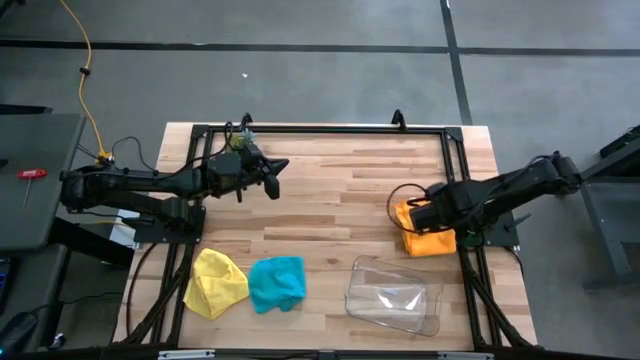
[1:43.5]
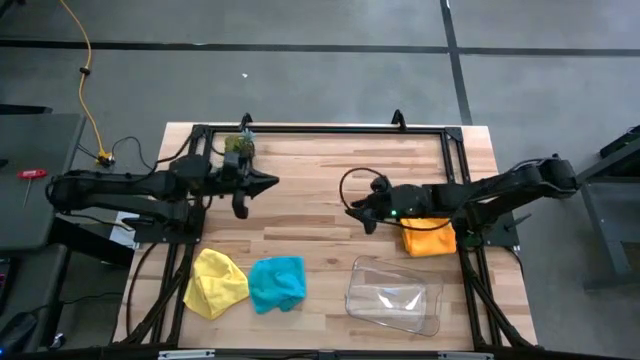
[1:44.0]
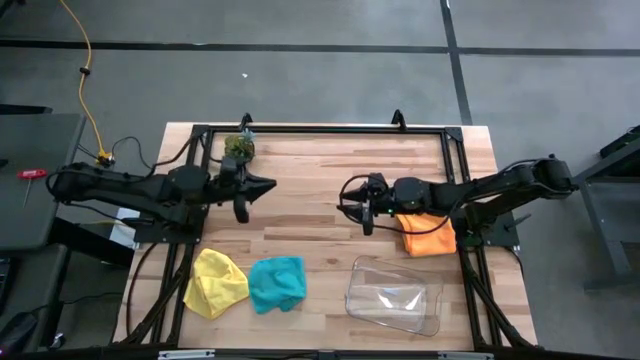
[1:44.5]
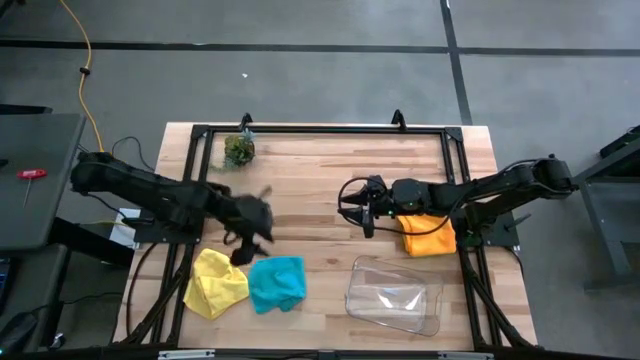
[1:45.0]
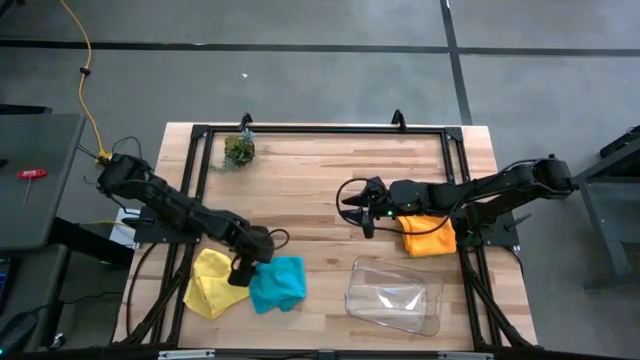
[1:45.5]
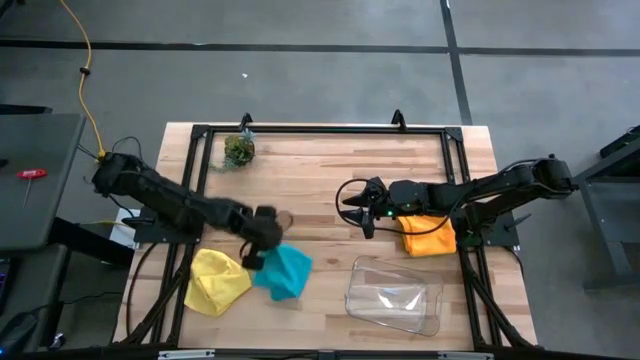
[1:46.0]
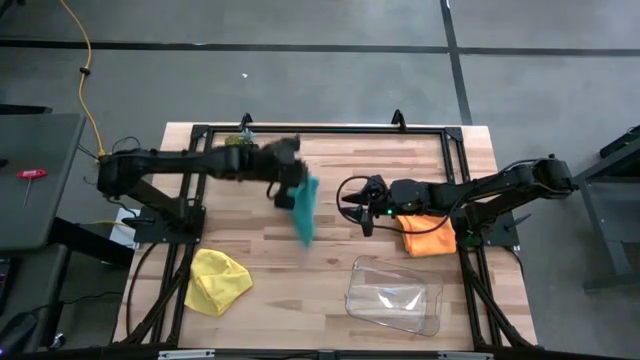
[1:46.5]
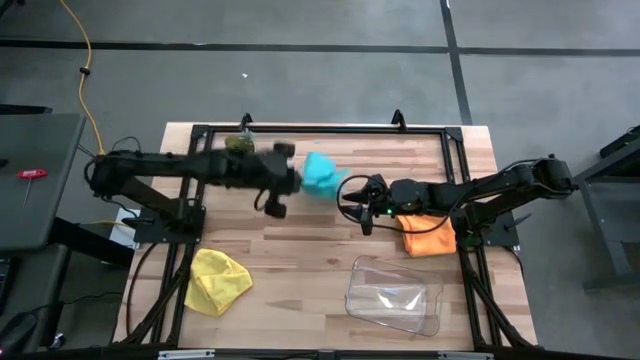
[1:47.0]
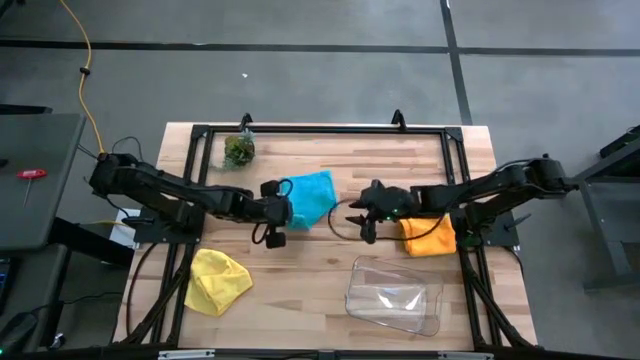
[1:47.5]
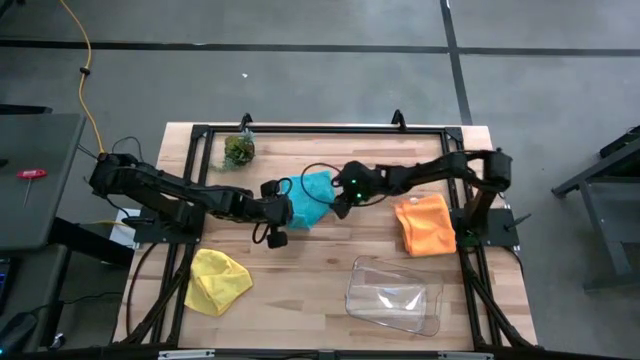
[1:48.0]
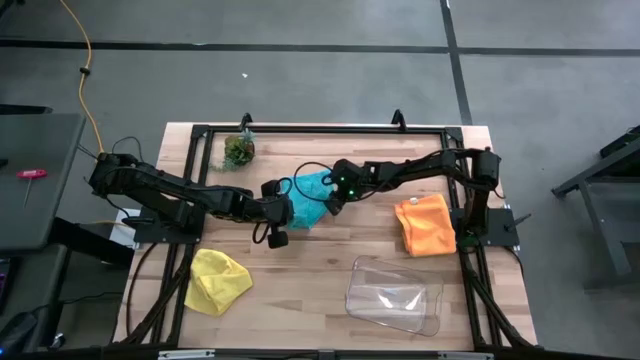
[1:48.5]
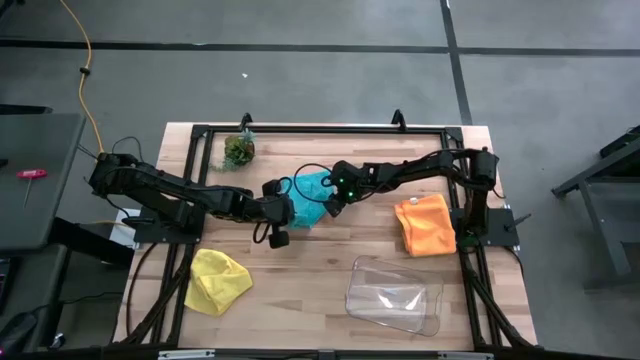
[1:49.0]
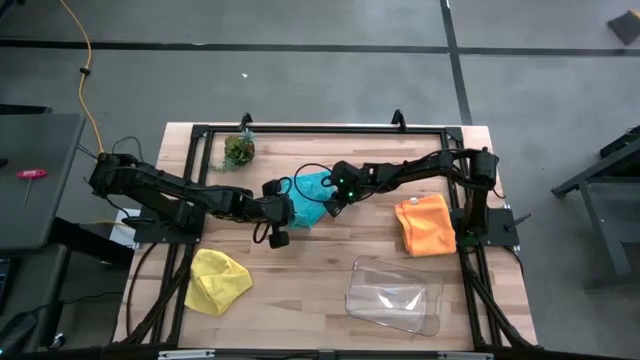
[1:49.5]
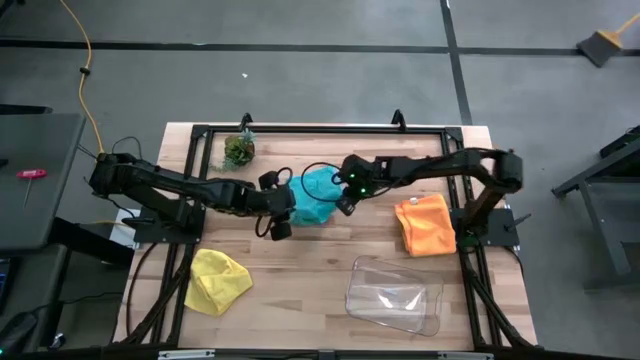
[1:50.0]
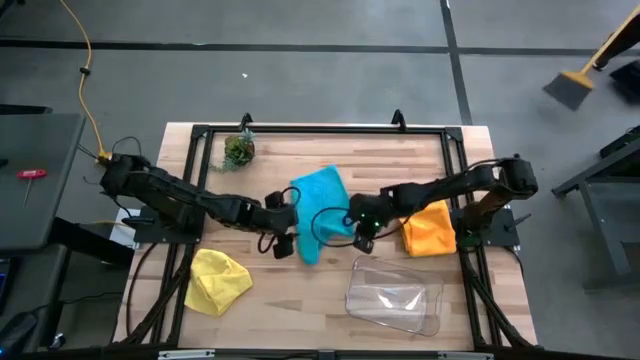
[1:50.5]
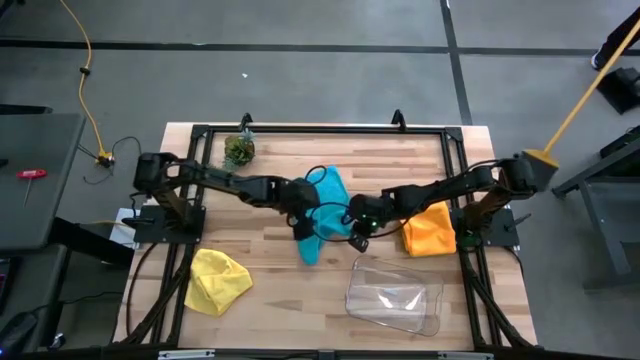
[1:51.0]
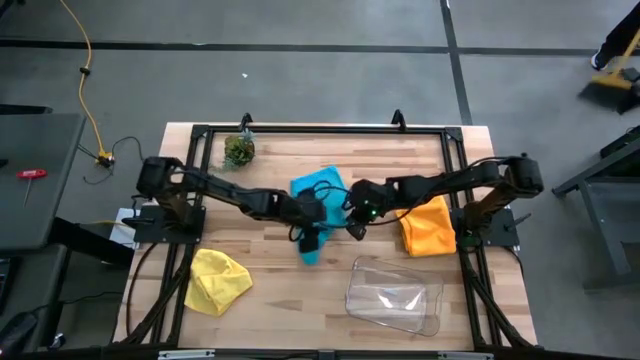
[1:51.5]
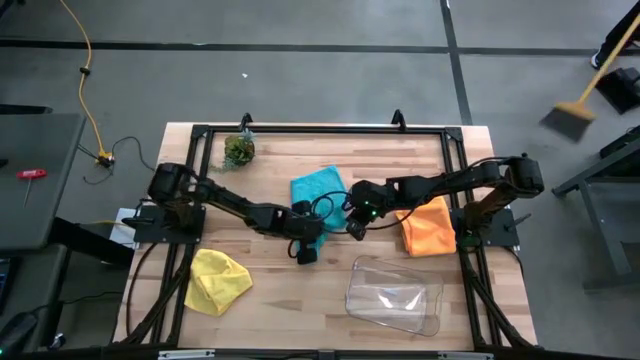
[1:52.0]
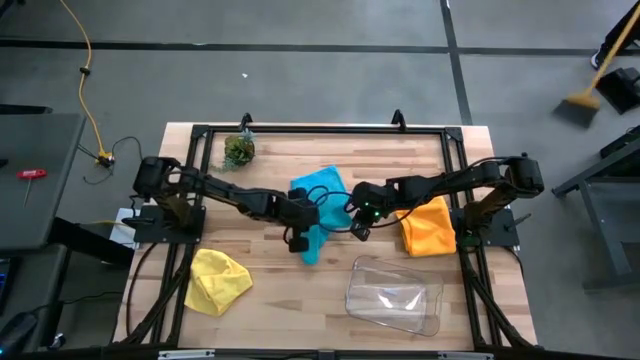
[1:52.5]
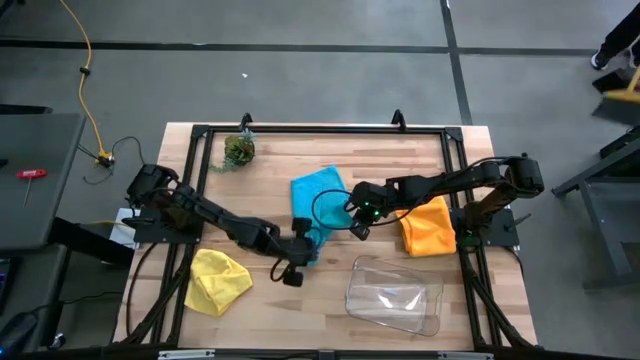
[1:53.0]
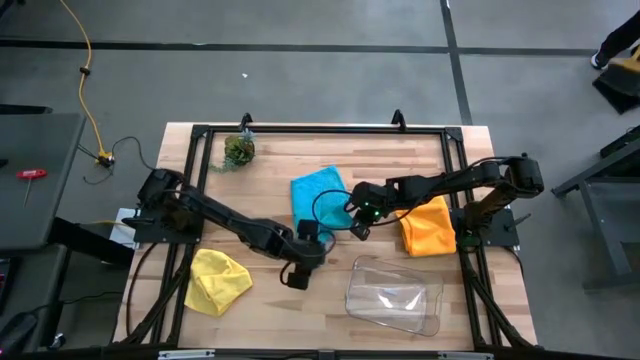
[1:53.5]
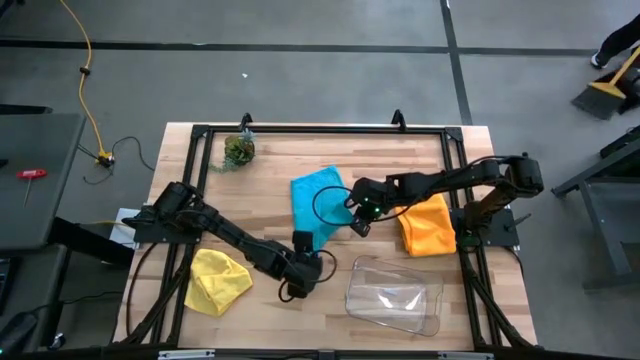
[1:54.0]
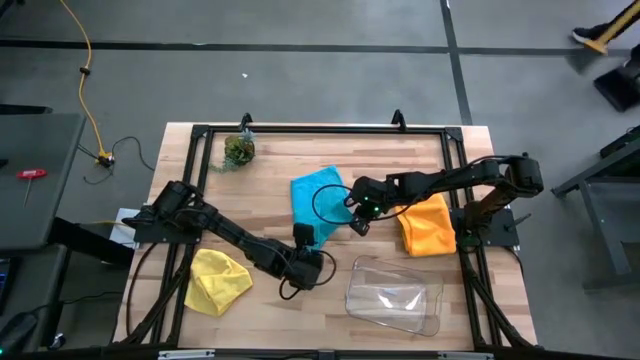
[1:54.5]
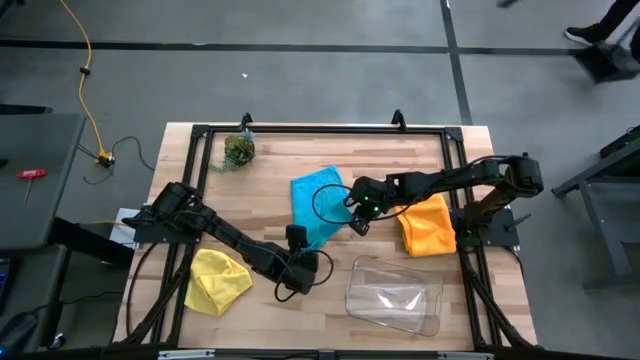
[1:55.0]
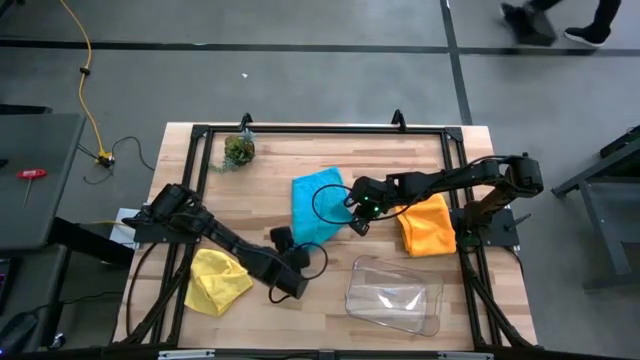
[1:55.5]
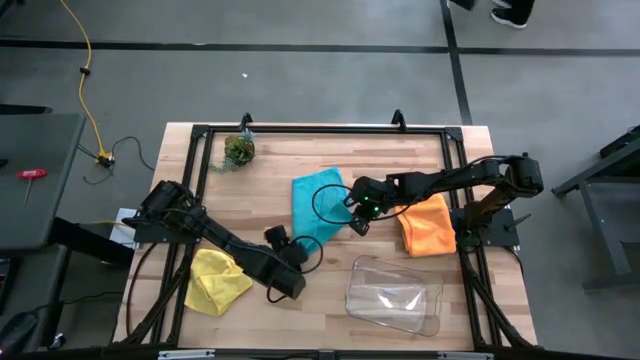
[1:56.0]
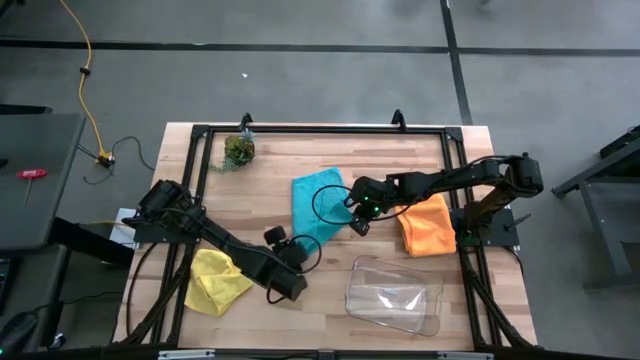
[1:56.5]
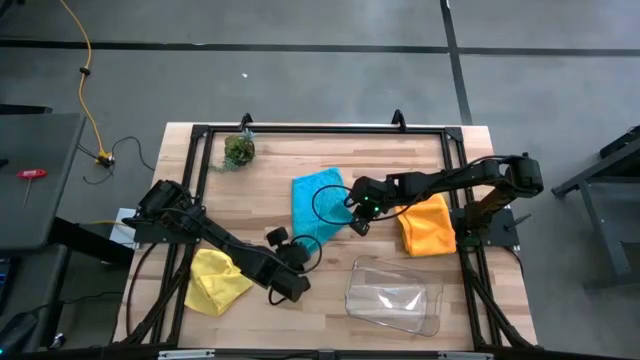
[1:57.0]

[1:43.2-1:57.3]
Task: Fold microfiber towels
Fold the blue cloth

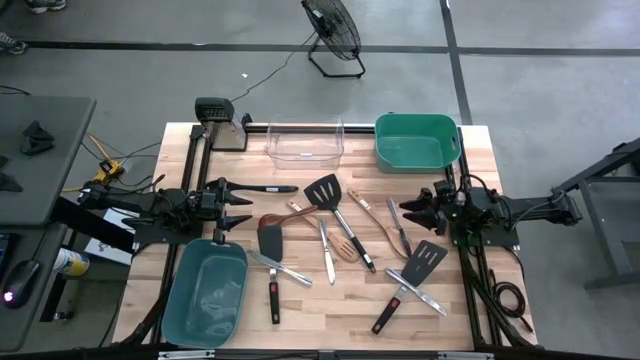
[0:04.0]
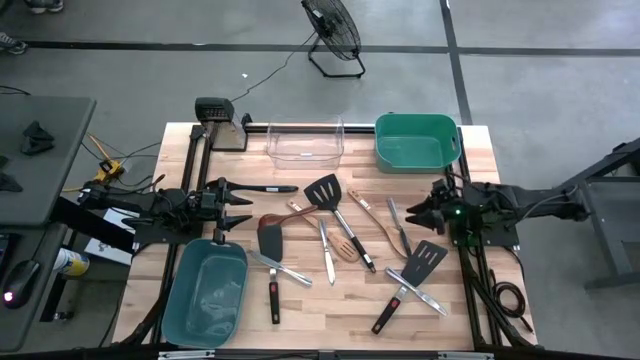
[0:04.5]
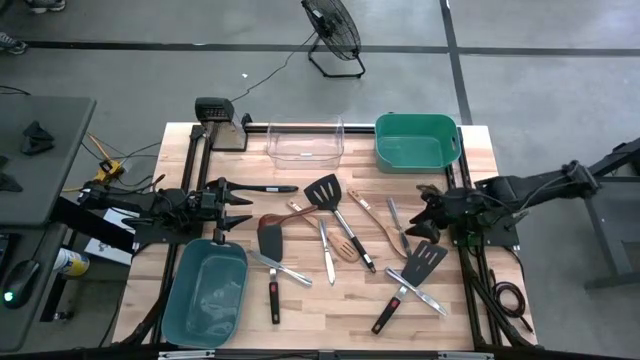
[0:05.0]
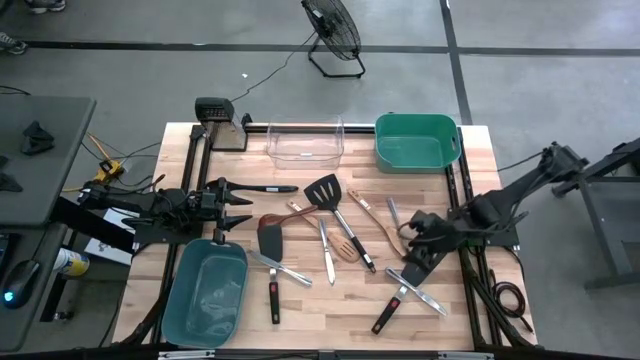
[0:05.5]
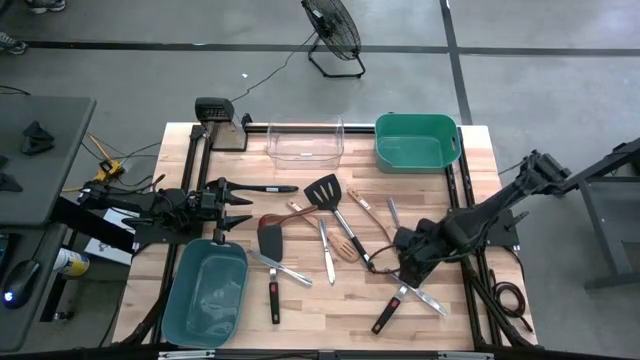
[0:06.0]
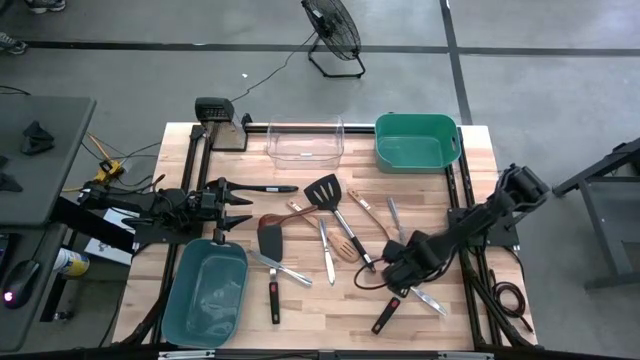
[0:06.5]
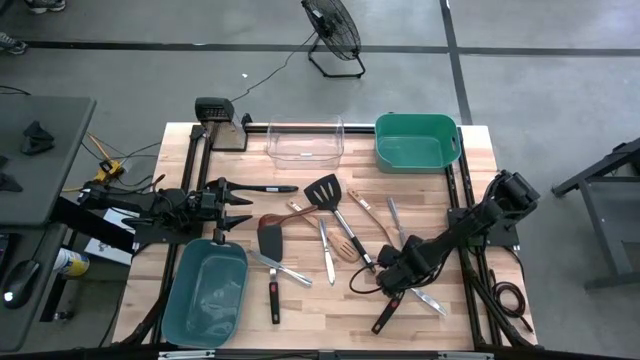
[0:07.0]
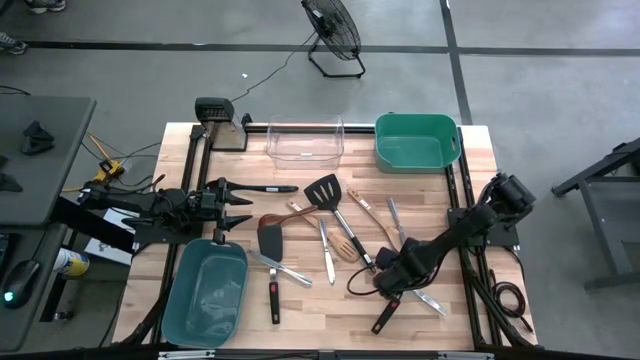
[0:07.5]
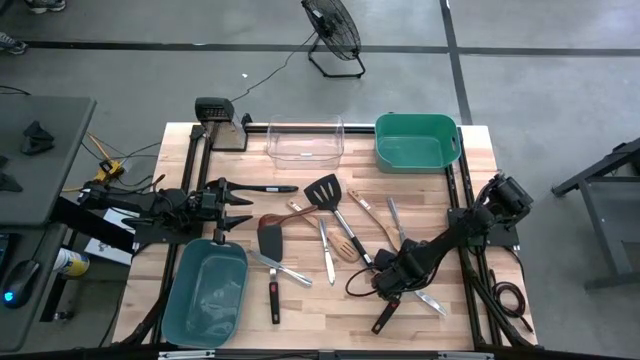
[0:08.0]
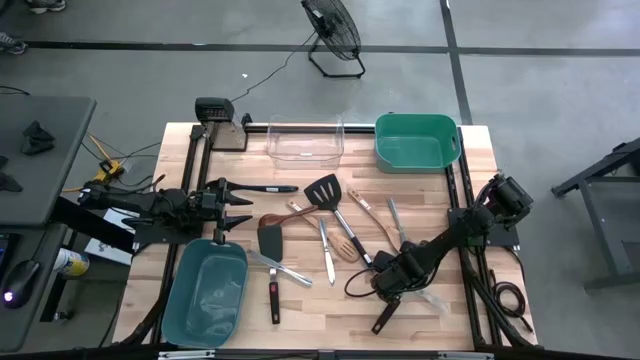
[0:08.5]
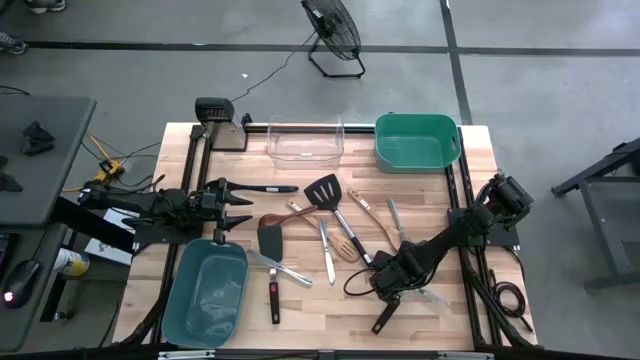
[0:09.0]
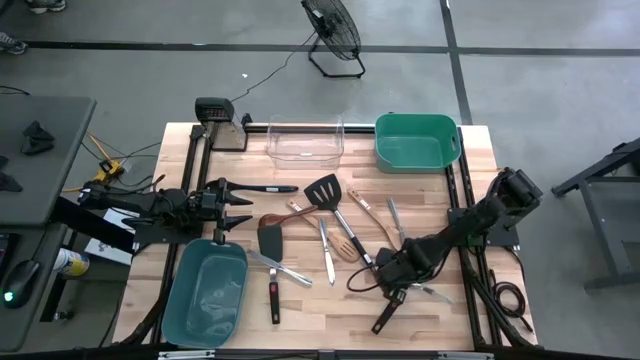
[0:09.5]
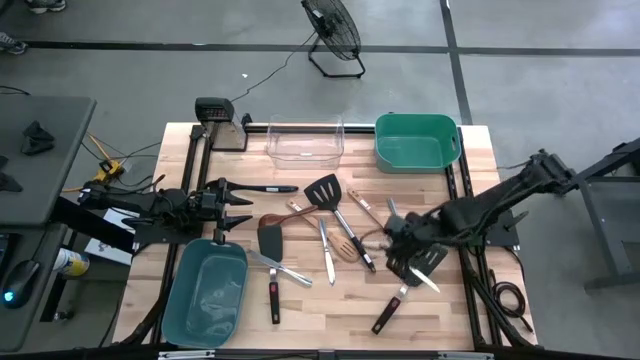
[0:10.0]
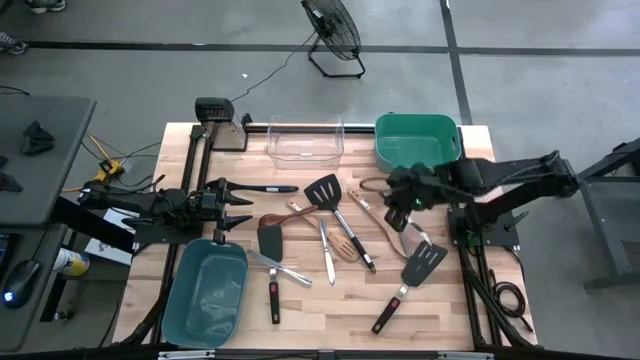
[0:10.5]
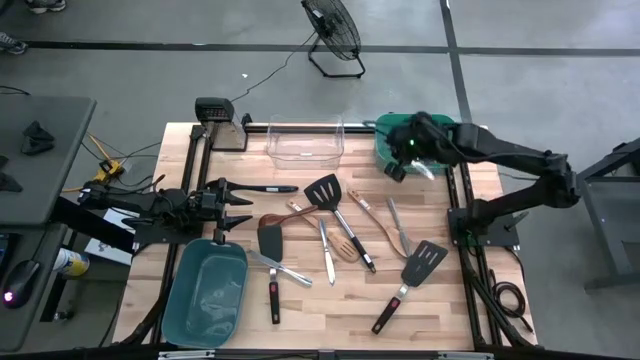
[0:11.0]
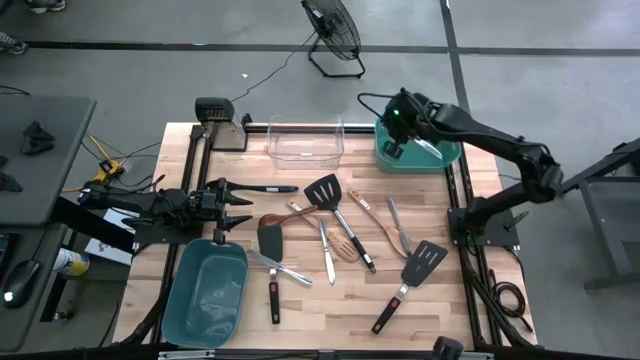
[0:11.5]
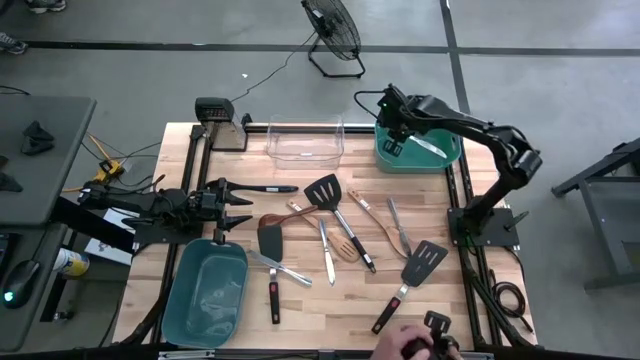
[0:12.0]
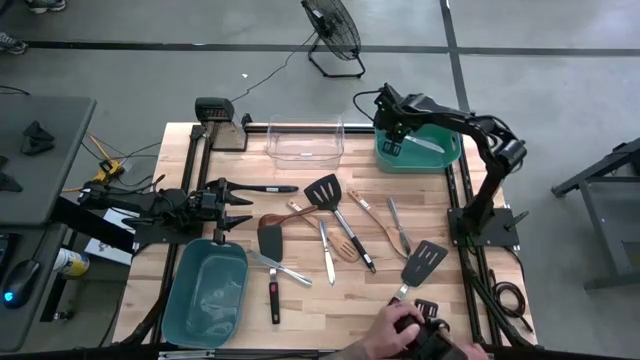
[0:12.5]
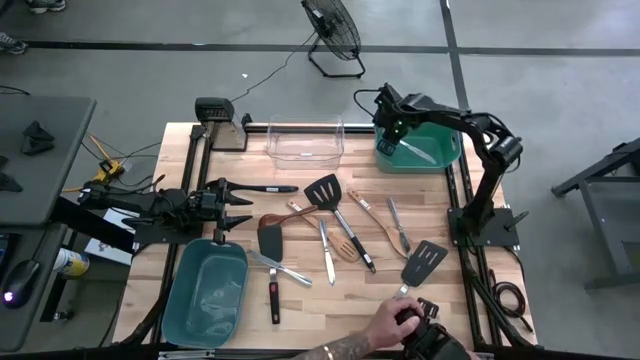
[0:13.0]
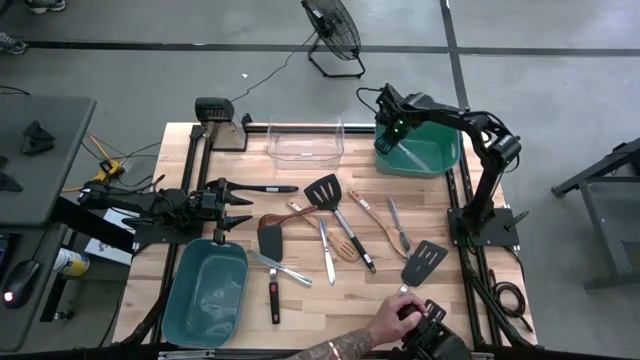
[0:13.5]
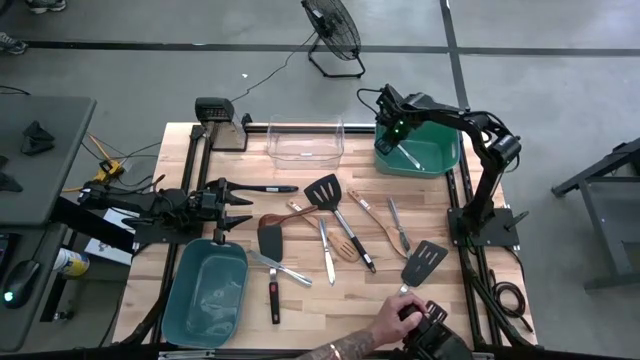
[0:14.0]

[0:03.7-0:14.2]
Task: Pick & Place Kitchen Items
Put the dinner knife into the green bin
